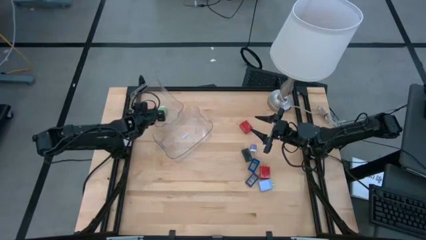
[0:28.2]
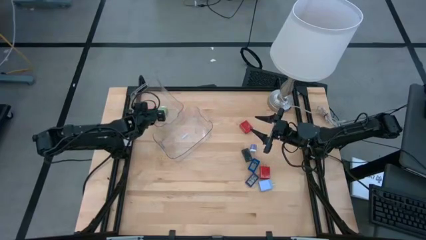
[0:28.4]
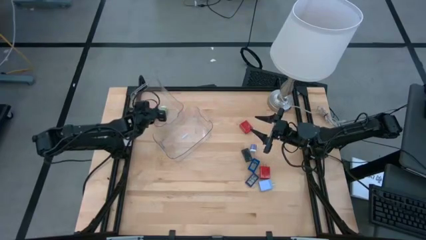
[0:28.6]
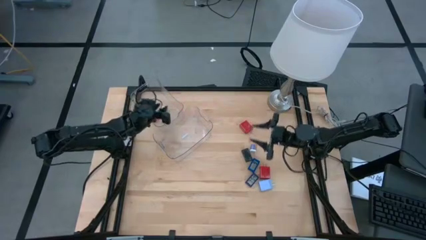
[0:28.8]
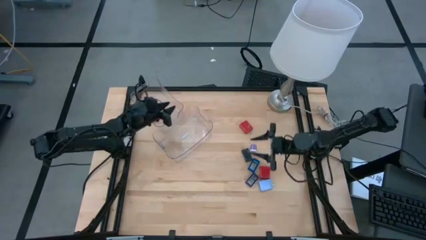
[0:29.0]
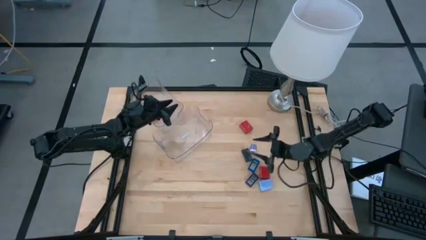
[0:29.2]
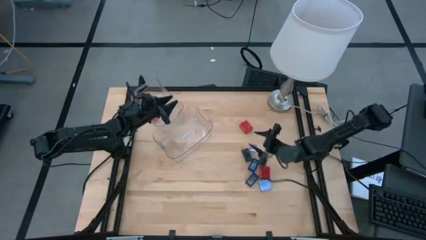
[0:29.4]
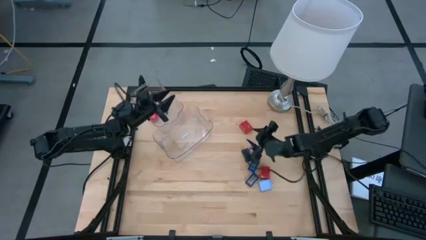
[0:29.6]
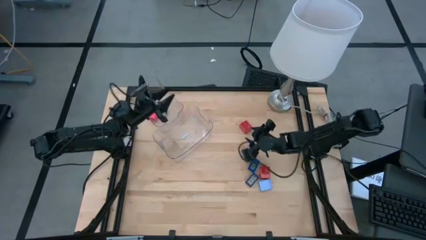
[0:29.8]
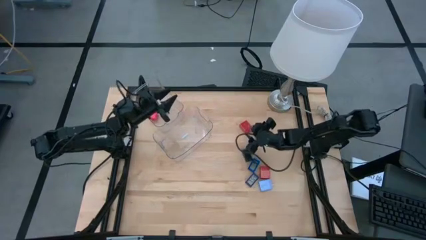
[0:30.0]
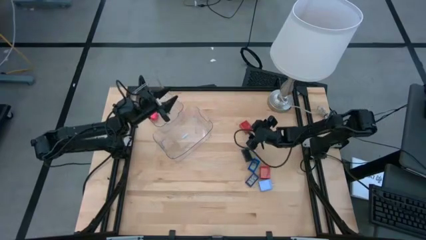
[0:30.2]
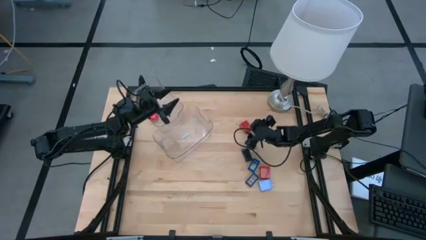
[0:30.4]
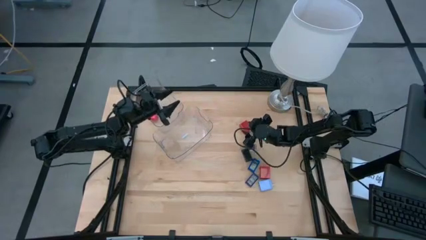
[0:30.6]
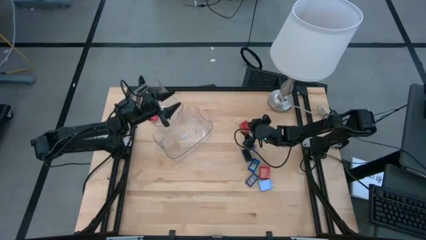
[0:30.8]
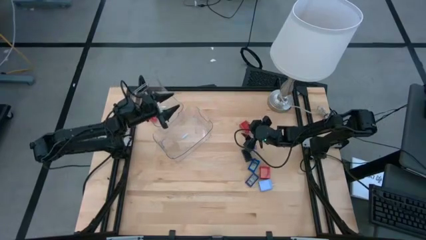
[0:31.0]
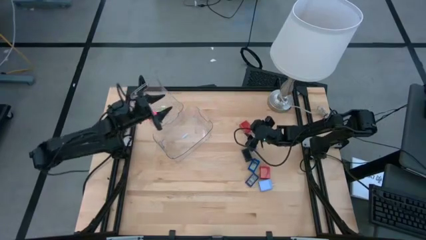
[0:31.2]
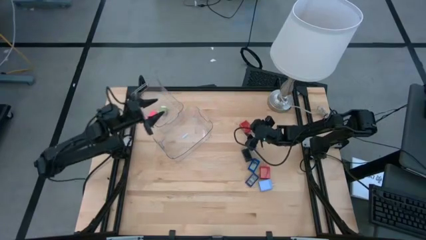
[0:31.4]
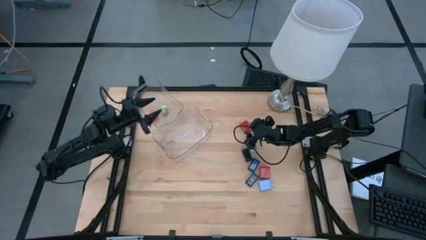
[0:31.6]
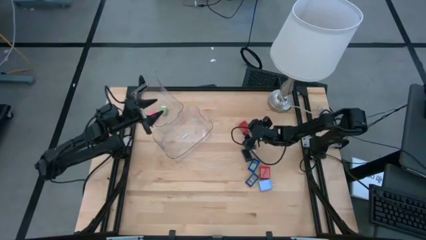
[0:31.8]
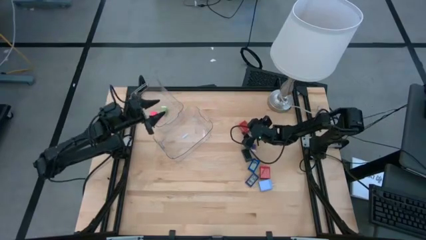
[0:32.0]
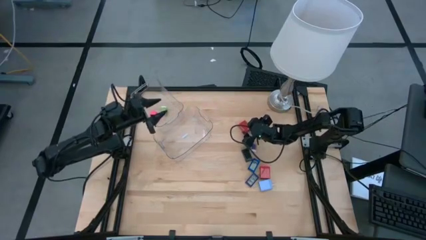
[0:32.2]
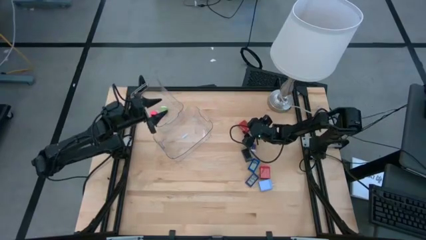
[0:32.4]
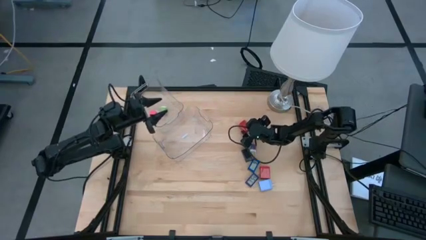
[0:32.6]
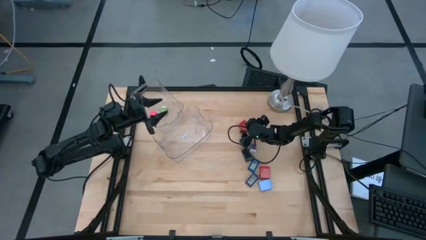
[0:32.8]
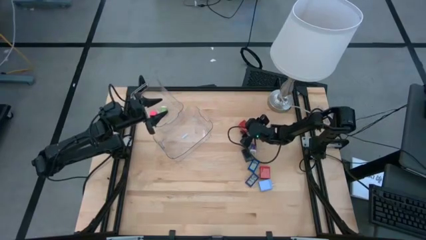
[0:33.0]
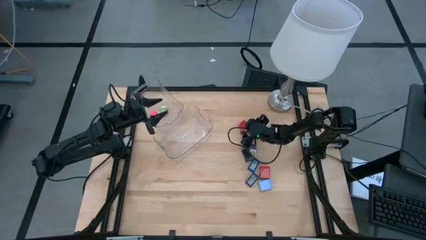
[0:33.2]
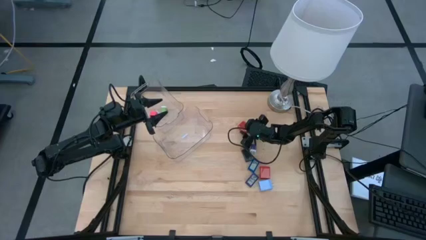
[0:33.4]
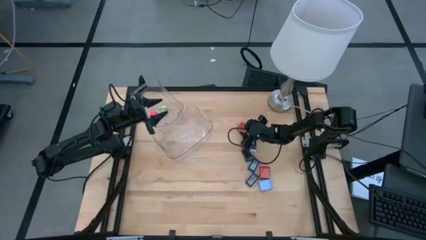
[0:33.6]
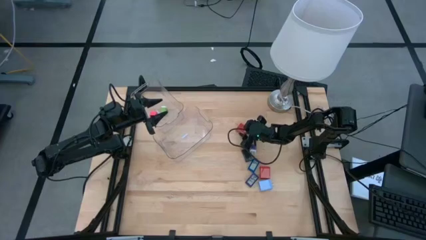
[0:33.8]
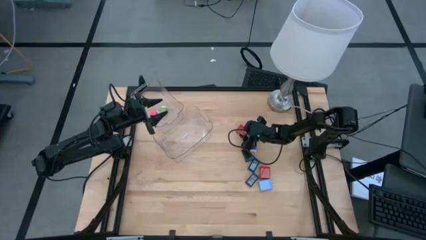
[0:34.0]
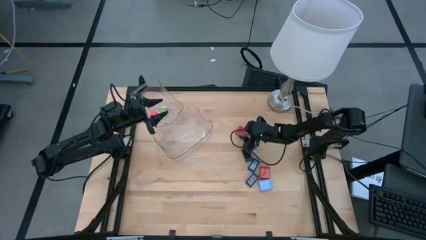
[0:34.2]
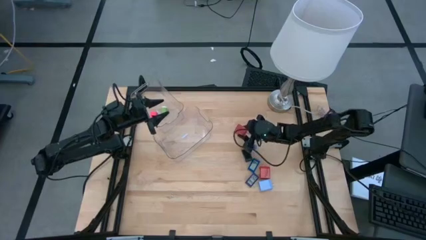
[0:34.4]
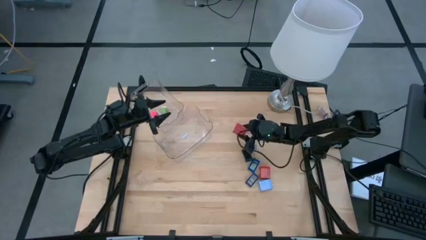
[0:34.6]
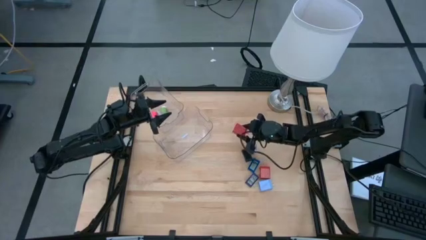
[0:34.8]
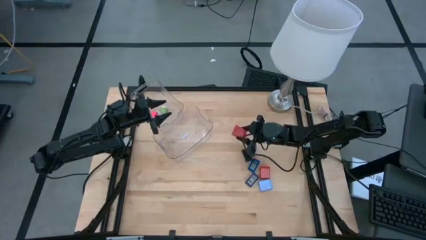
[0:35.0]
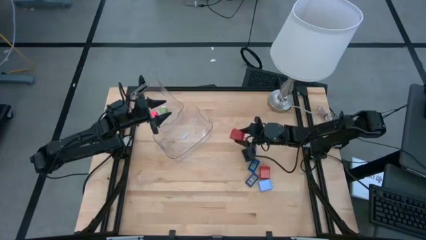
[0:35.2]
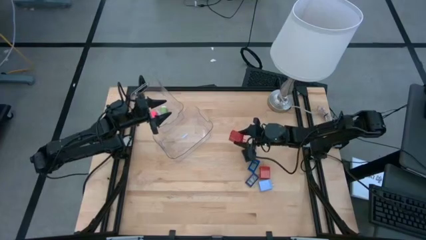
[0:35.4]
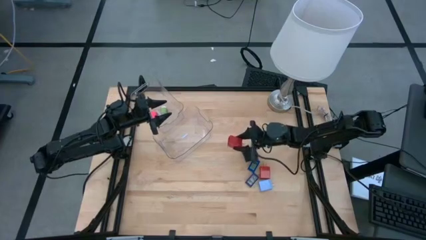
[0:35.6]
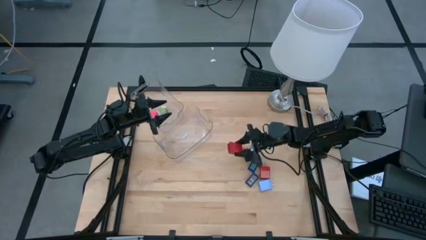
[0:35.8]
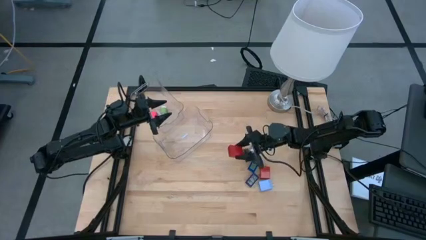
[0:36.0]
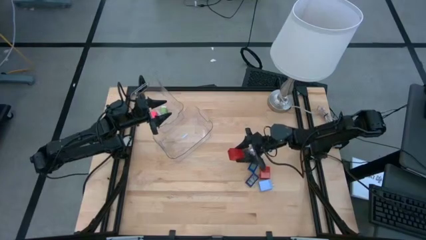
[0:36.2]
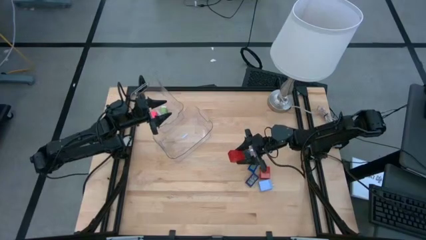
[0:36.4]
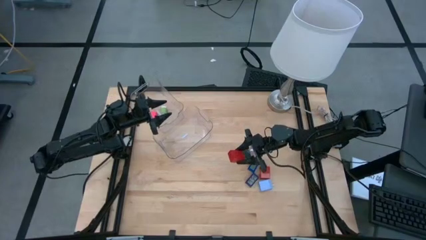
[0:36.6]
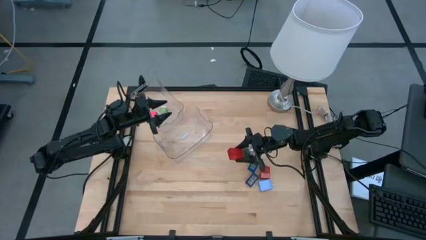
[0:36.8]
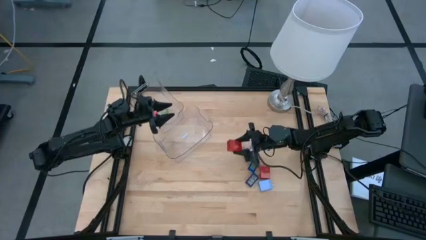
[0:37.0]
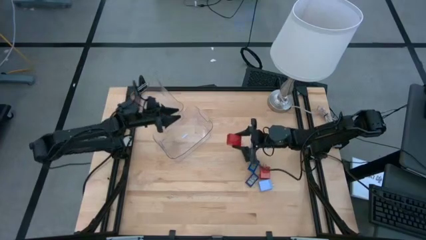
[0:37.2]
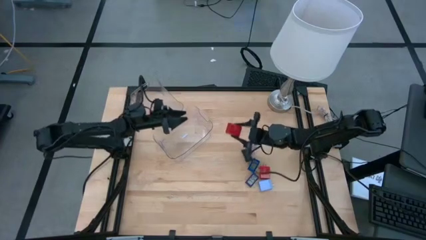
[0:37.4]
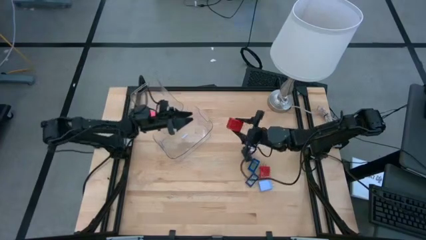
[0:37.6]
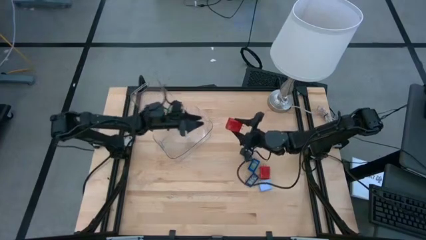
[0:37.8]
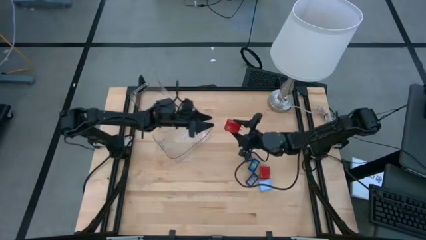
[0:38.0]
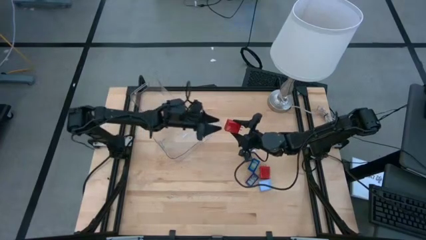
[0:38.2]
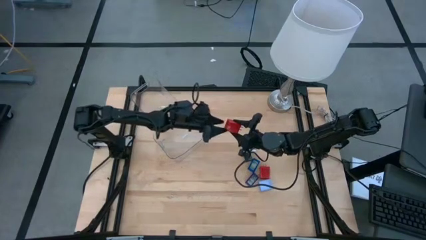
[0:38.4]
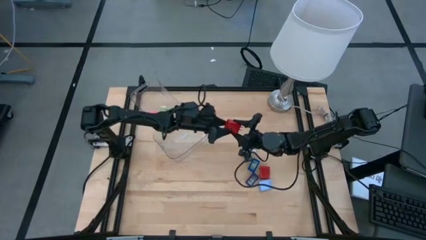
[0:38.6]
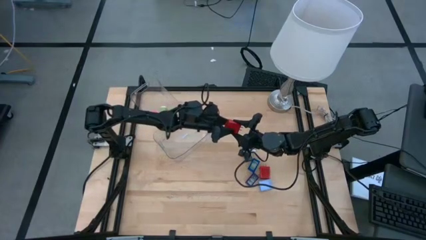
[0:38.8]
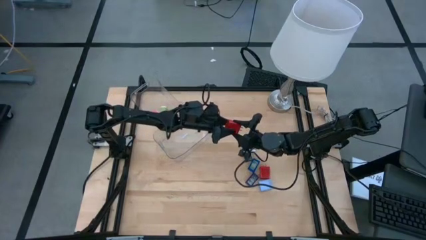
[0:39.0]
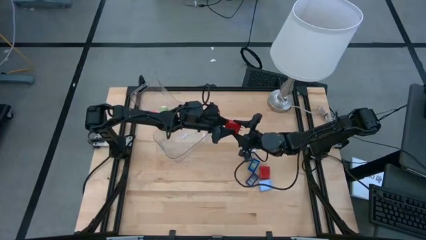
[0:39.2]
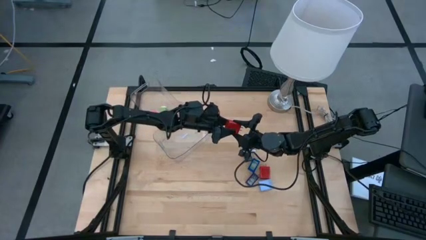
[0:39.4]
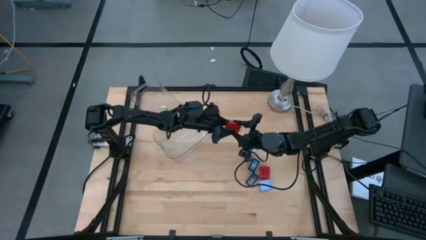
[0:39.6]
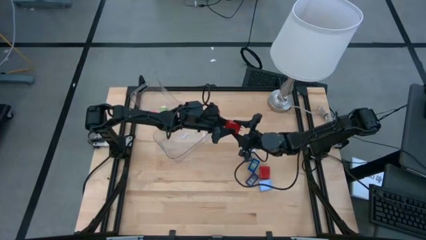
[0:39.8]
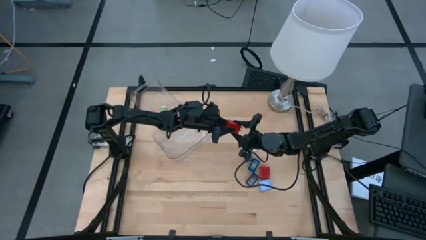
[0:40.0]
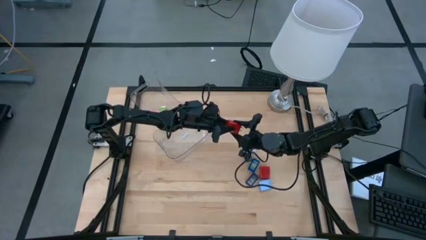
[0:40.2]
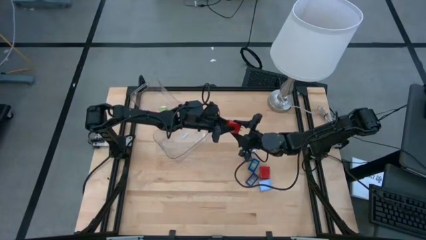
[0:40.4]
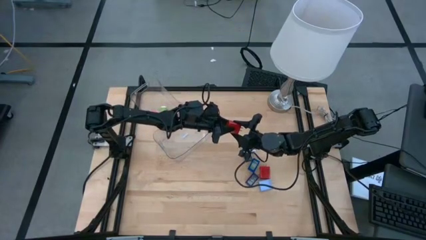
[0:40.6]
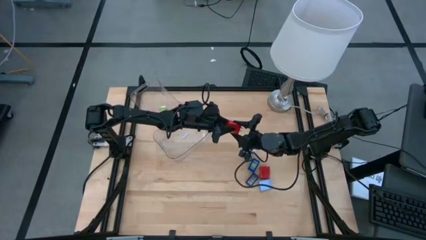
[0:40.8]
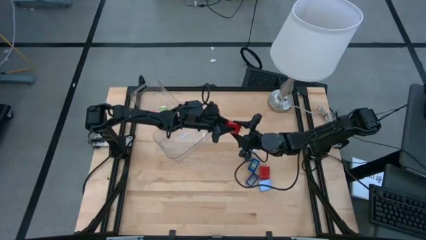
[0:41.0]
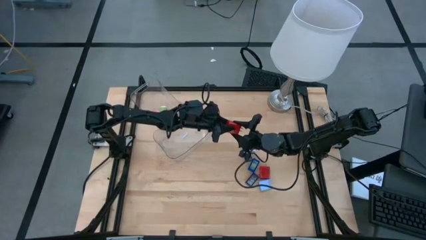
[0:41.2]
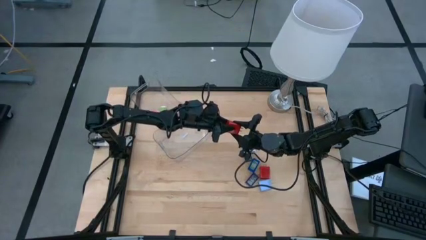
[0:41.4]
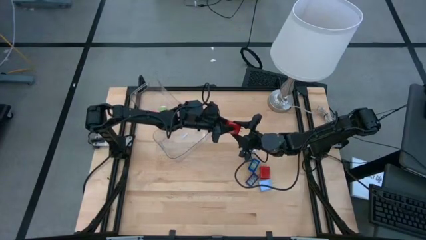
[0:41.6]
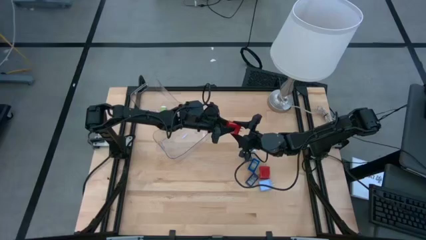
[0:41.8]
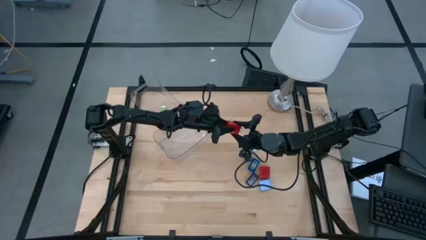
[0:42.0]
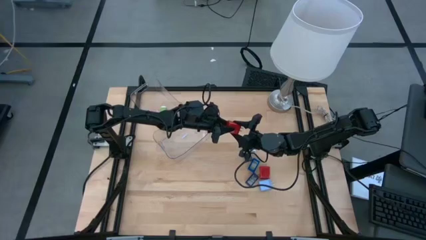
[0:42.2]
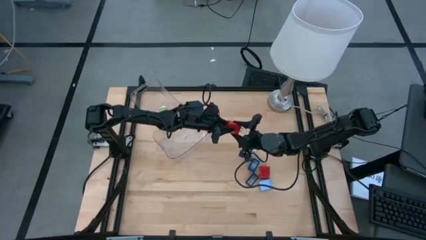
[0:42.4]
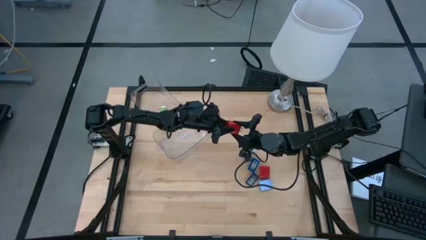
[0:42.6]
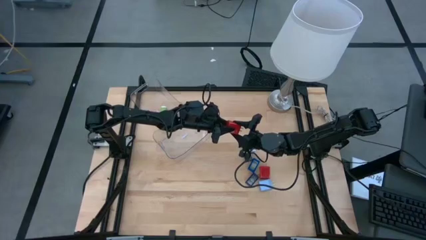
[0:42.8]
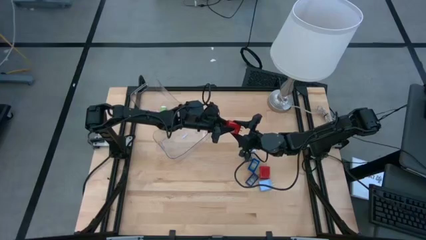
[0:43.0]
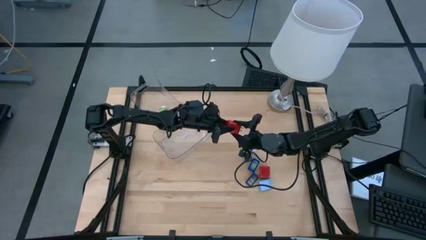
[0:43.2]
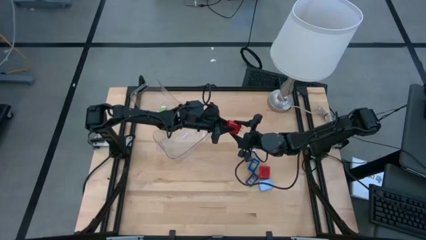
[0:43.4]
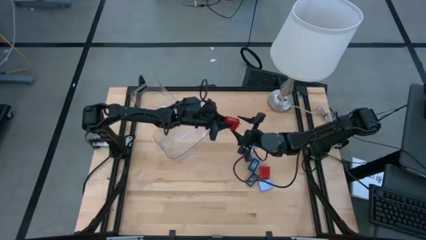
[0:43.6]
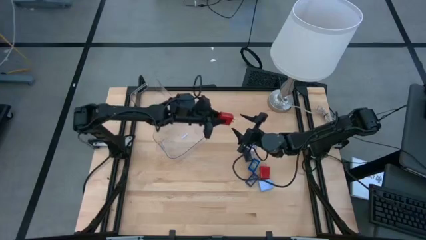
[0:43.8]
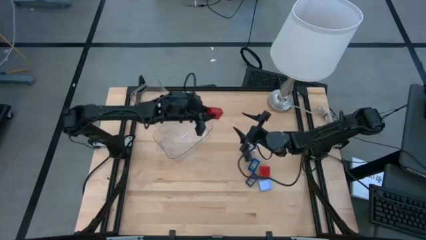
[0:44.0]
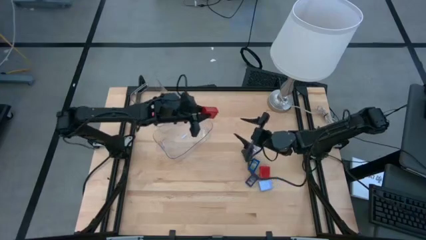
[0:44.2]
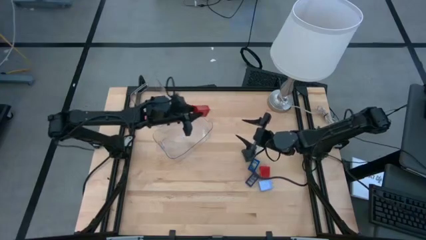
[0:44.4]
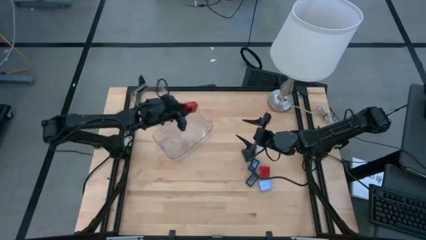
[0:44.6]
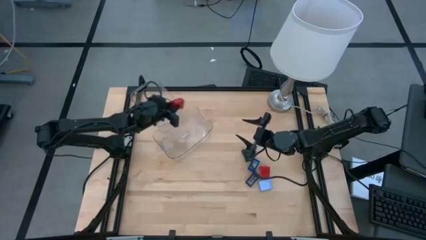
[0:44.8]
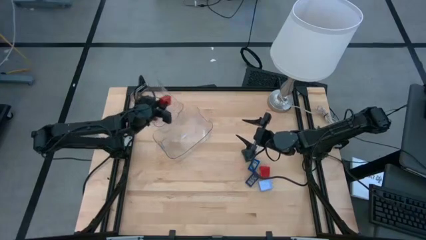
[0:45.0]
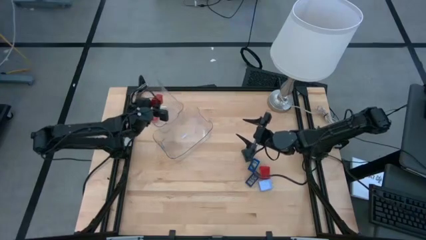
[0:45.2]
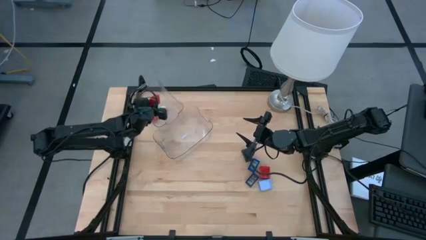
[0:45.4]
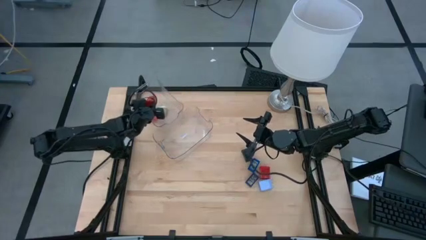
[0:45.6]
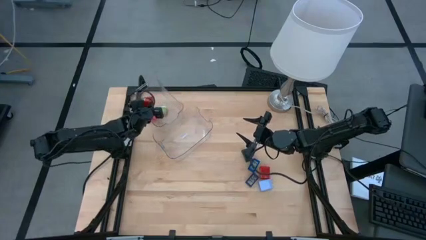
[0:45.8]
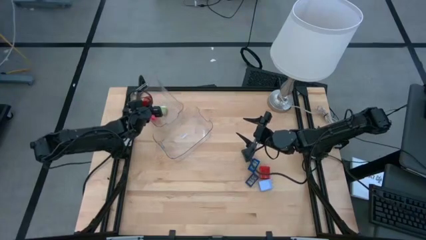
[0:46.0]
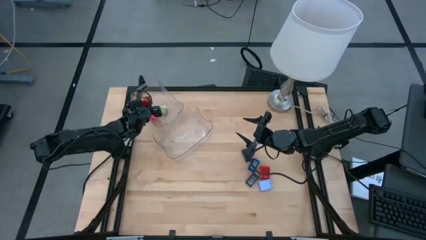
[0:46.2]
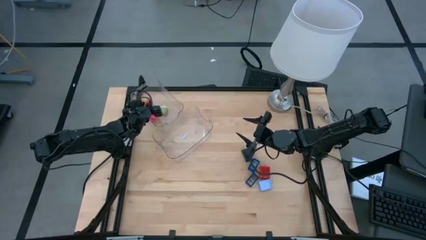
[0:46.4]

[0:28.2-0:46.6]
Task: Pick & Place Office items
Put the red charger adapter into the top transparent bin
